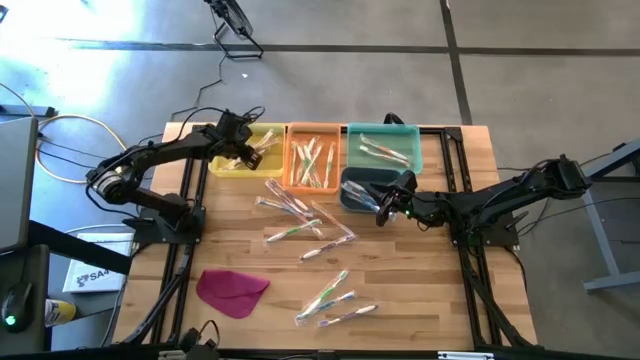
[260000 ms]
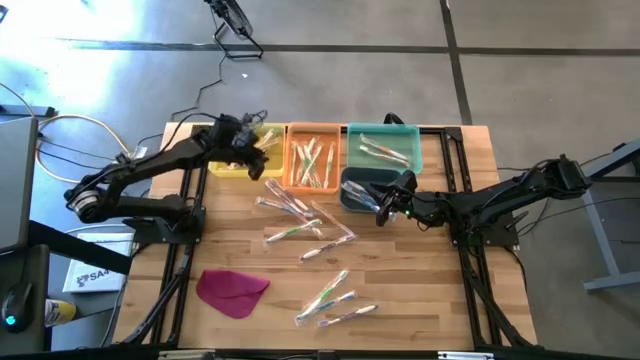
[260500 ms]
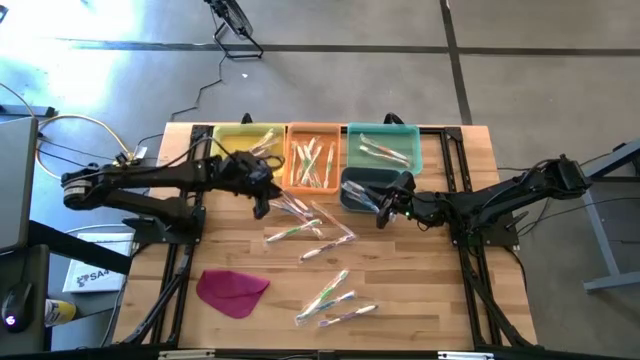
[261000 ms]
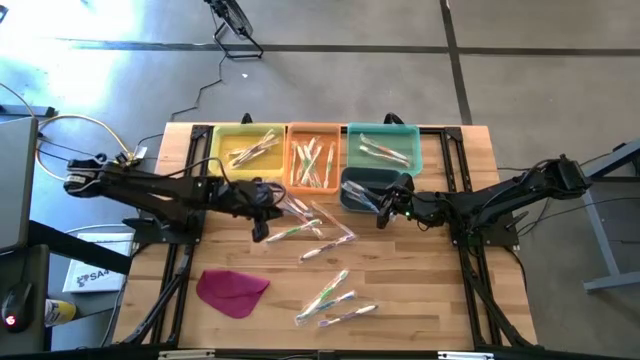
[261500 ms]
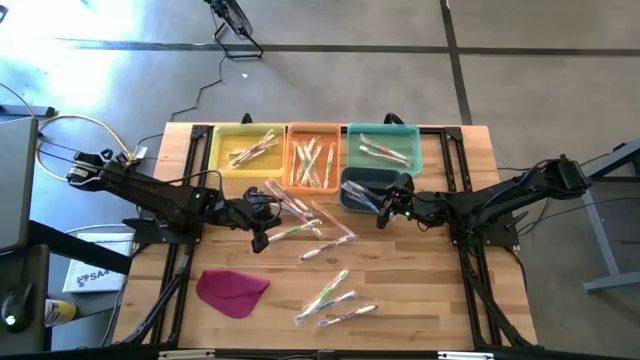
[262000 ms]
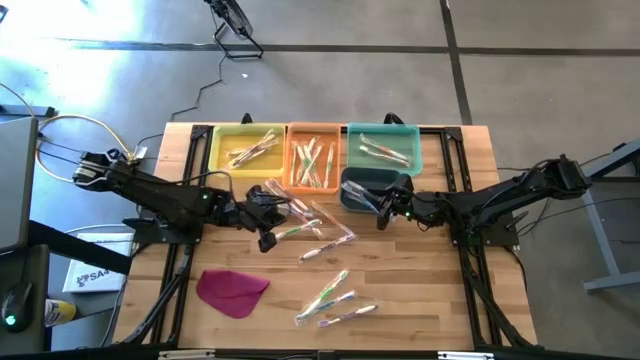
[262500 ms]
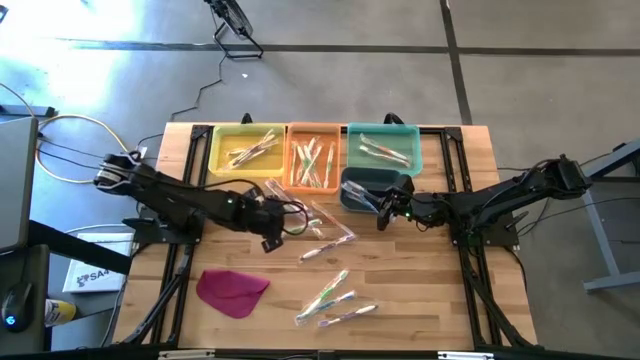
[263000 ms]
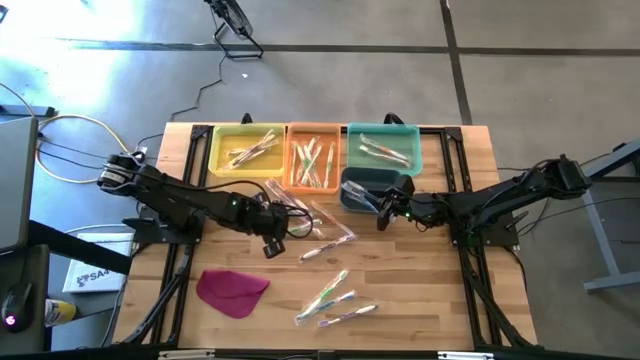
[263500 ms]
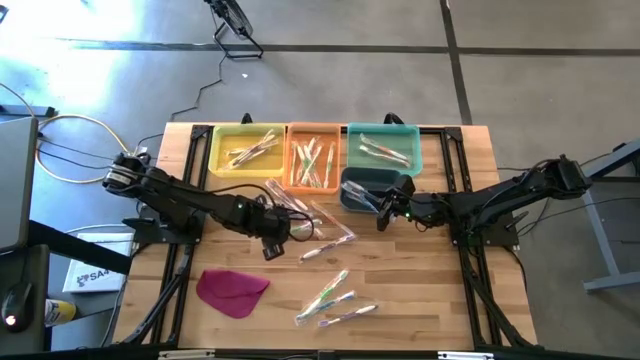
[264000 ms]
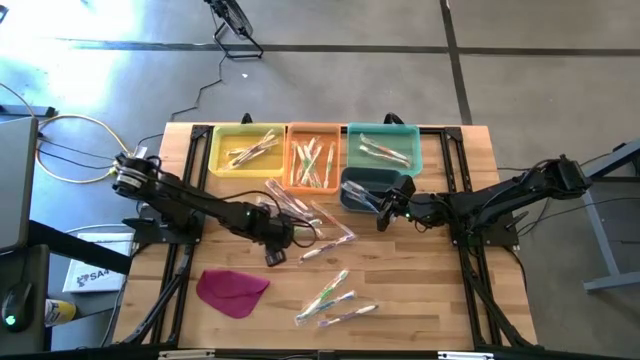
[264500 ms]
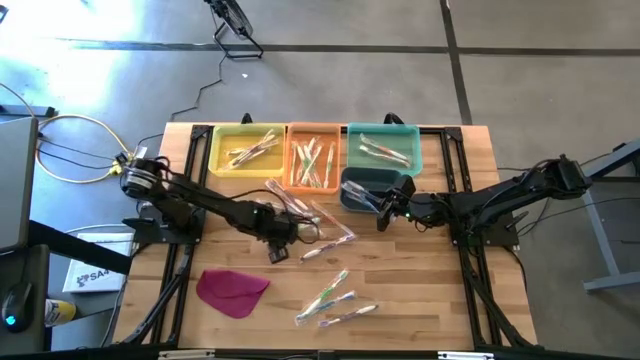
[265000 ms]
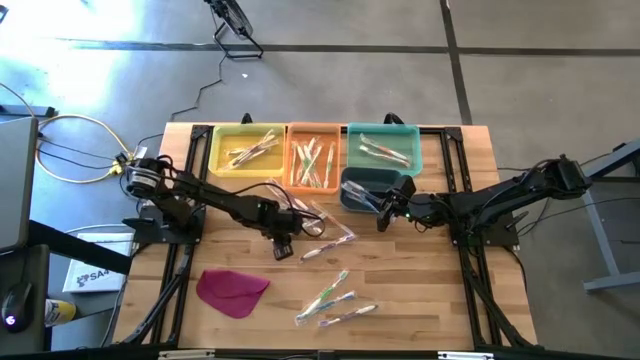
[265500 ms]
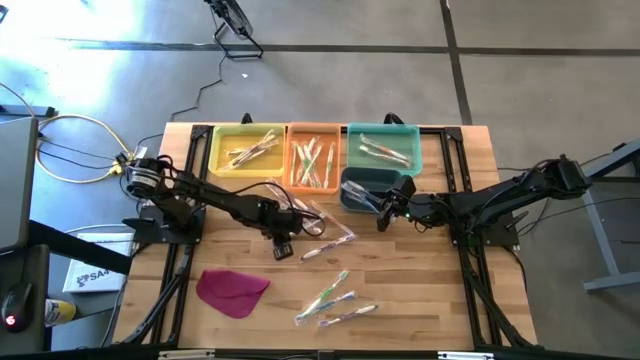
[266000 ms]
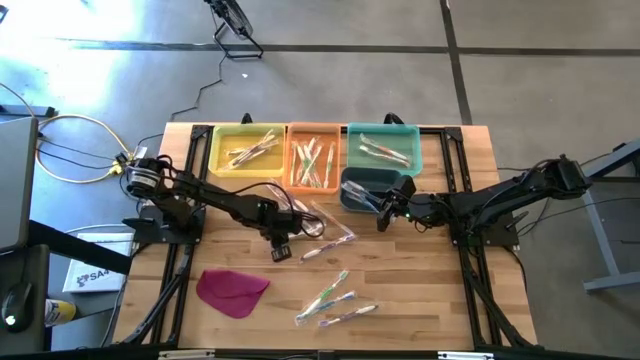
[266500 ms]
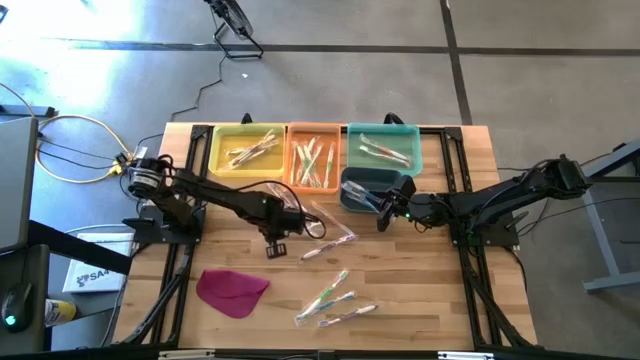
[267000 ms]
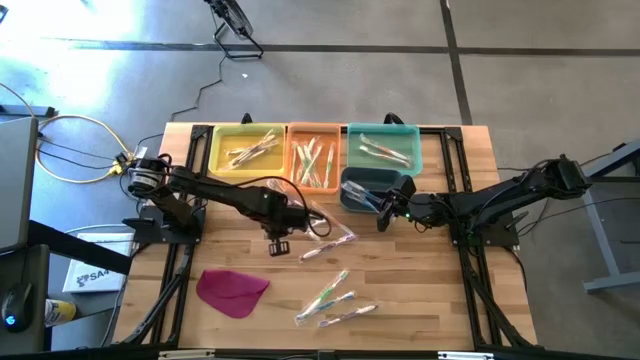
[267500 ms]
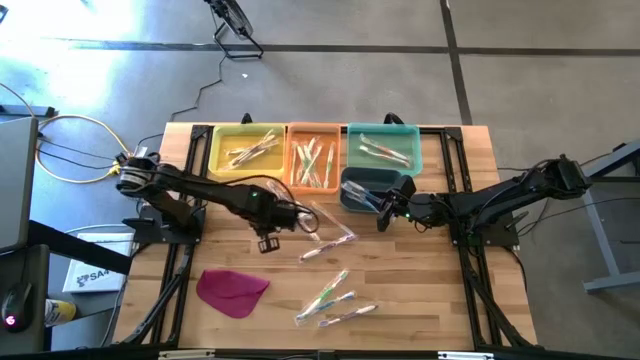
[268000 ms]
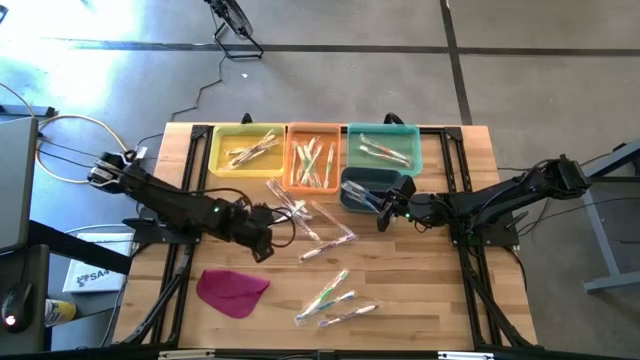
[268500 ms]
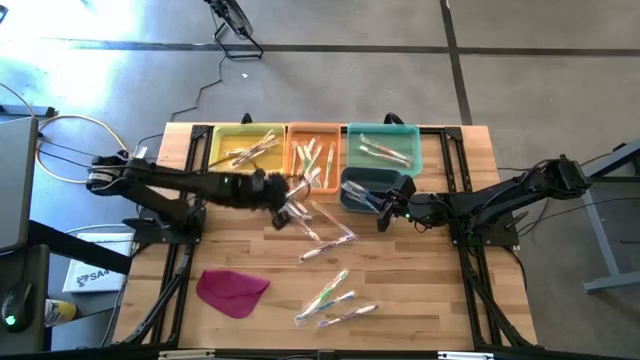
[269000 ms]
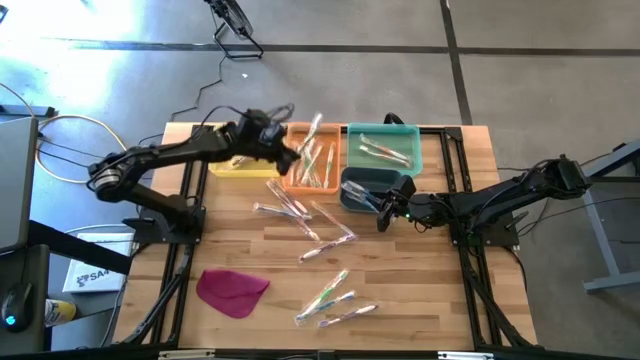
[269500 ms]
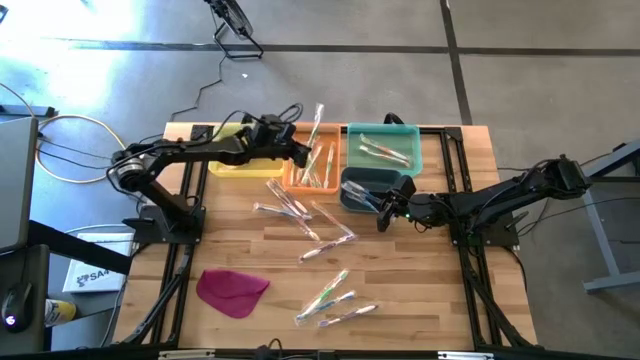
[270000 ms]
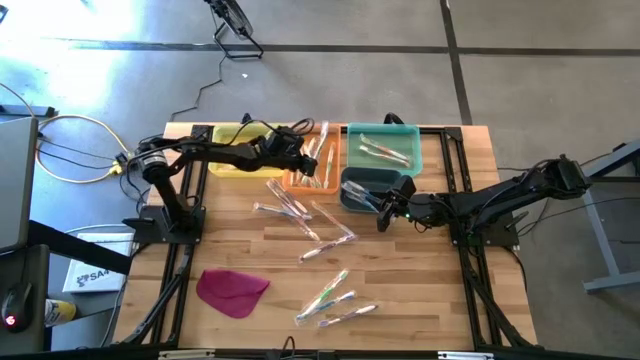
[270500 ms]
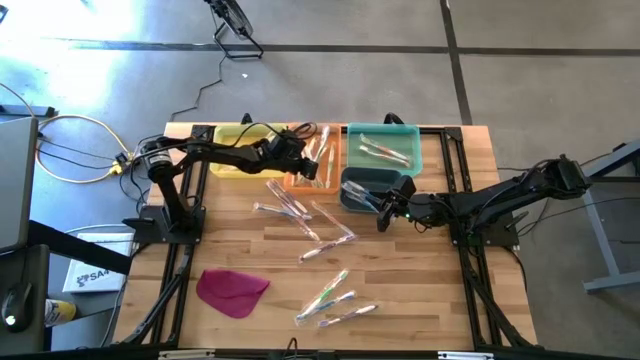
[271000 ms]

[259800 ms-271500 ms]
Task: Pick & Place Toothbrushes
Put the green toothbrush into the orange bin

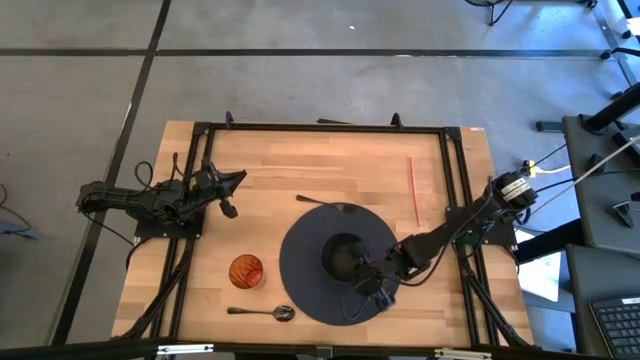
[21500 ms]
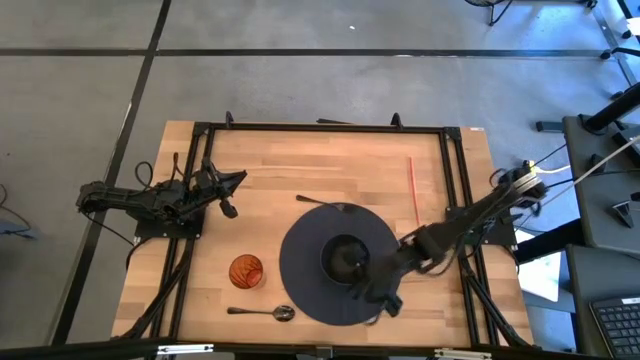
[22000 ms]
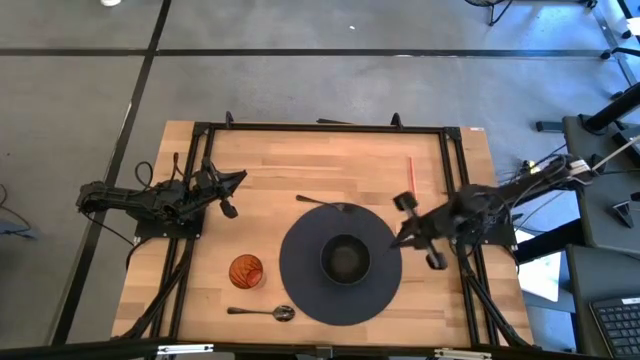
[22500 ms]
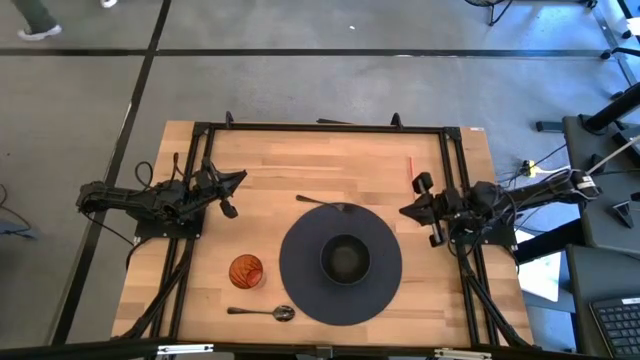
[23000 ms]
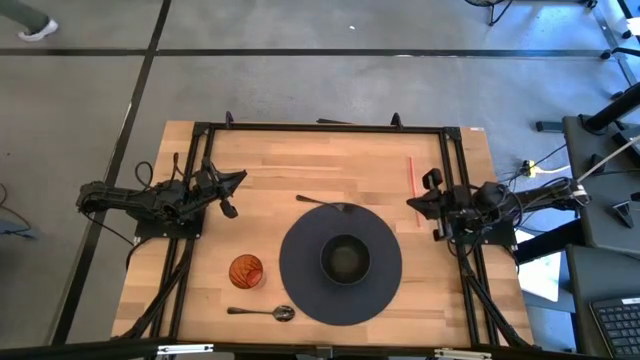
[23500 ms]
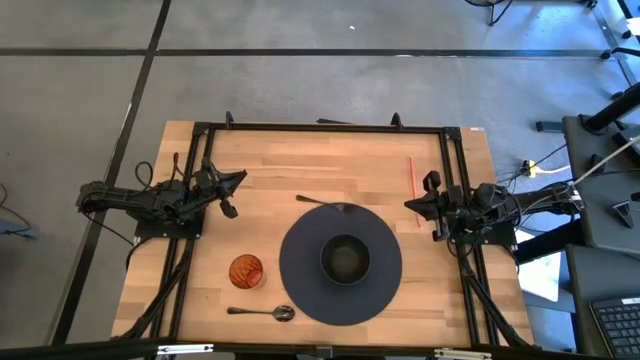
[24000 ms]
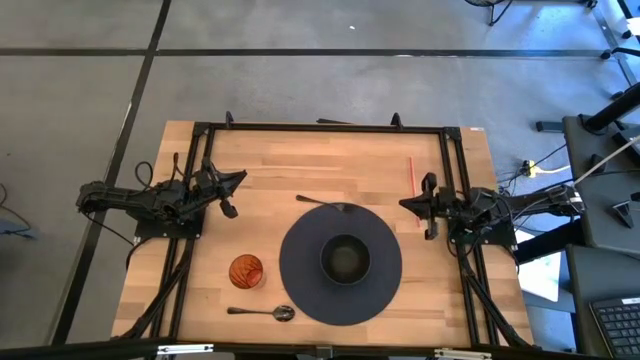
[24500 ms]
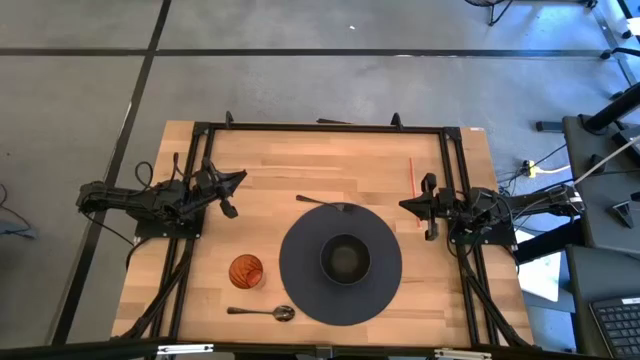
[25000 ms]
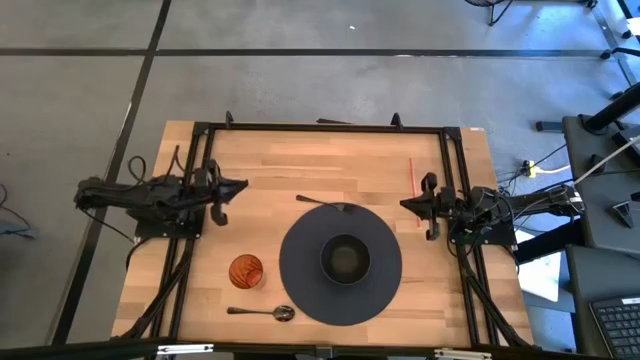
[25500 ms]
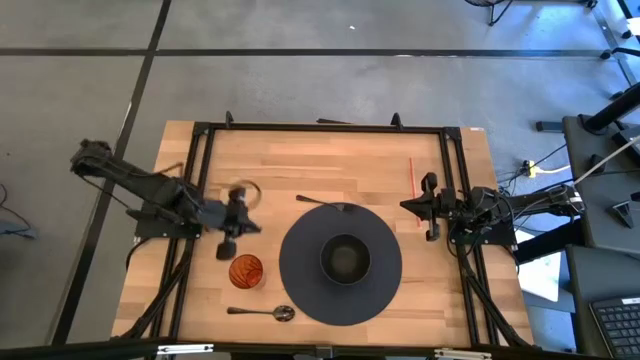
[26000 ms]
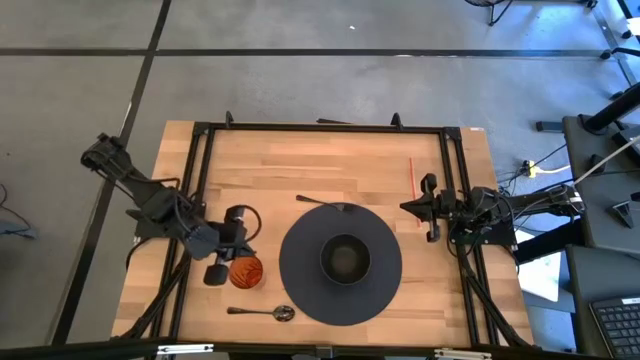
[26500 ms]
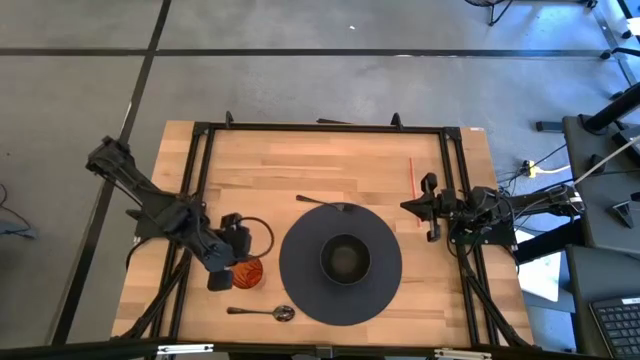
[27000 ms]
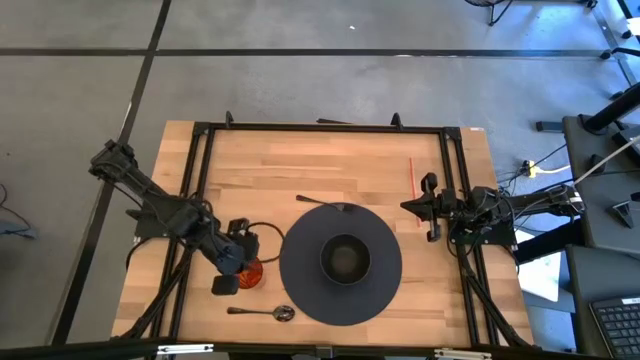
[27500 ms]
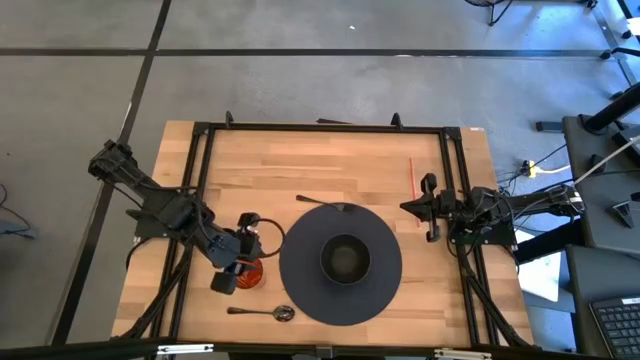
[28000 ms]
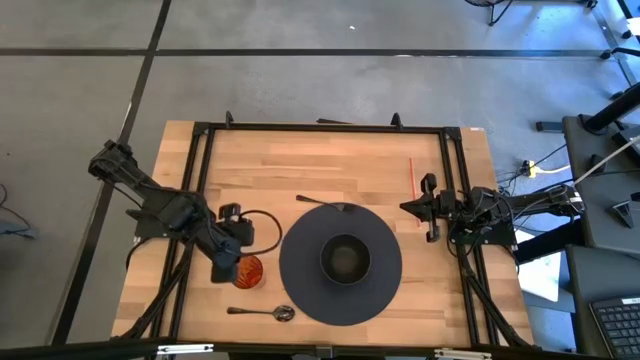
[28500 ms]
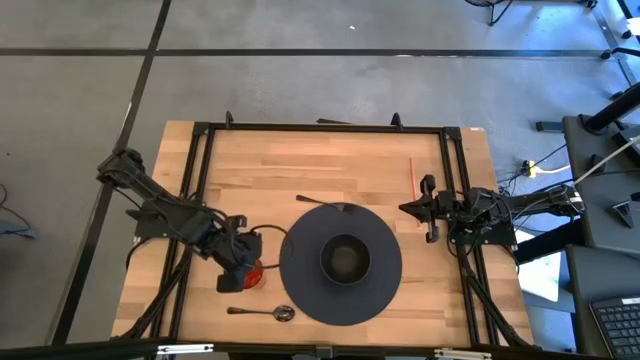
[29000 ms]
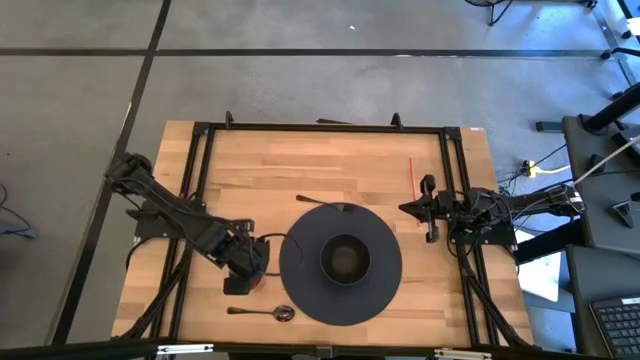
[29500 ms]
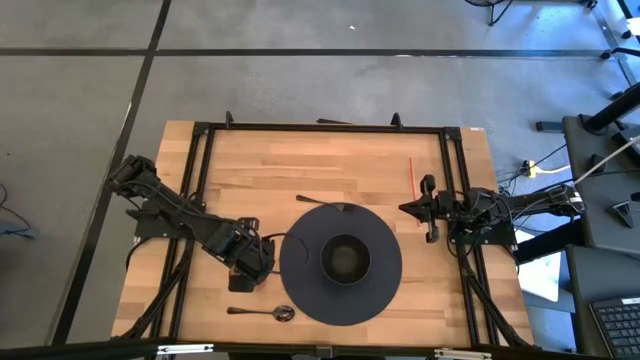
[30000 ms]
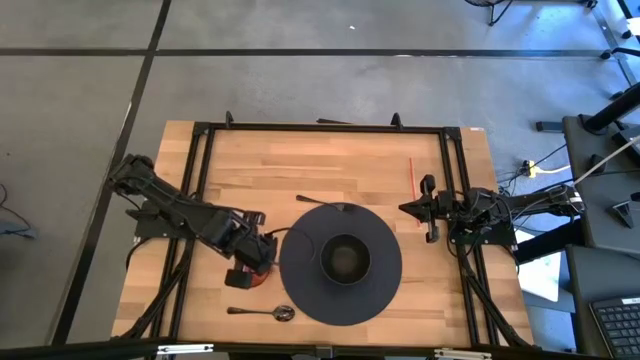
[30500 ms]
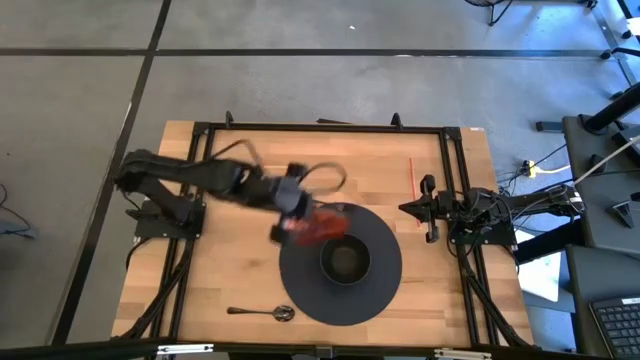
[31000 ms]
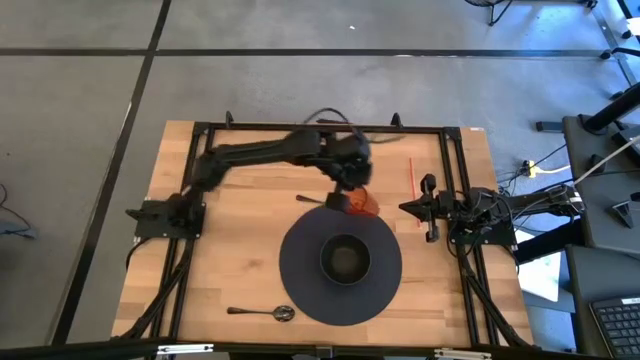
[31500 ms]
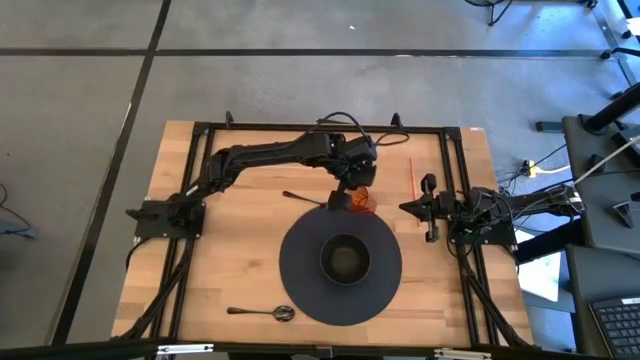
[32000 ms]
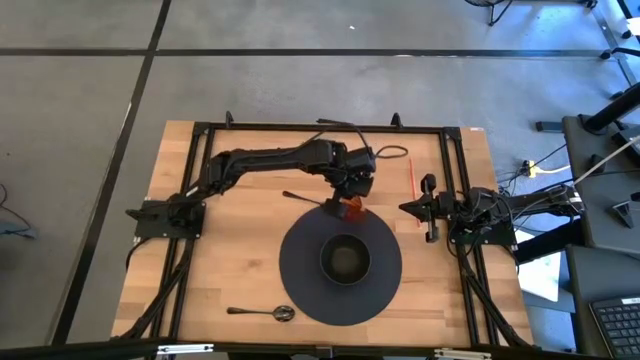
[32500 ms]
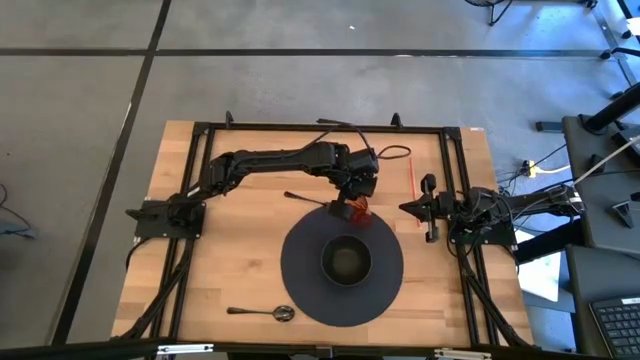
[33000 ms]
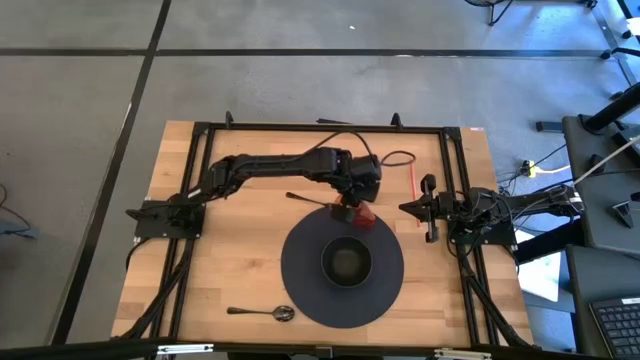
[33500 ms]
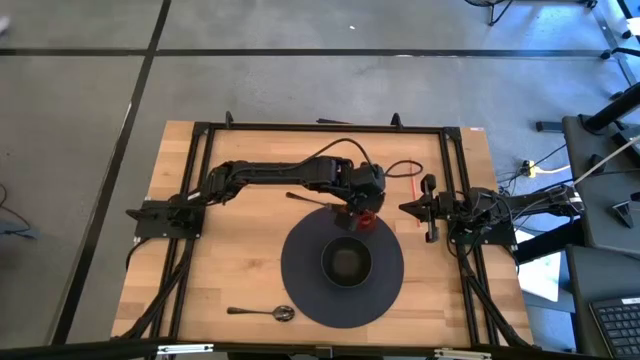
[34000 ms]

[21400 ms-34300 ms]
Task: Pick & Place Utensil
Put the orange cup on the black mat to the top right of the black bowl
